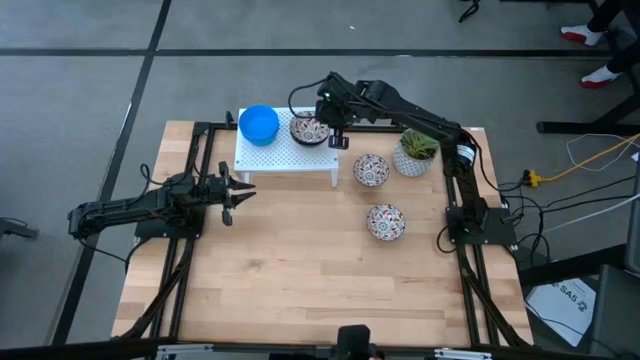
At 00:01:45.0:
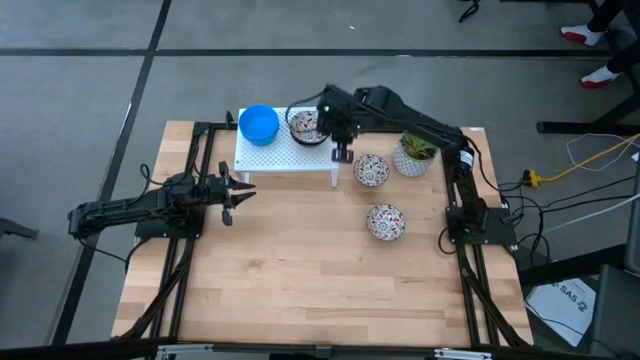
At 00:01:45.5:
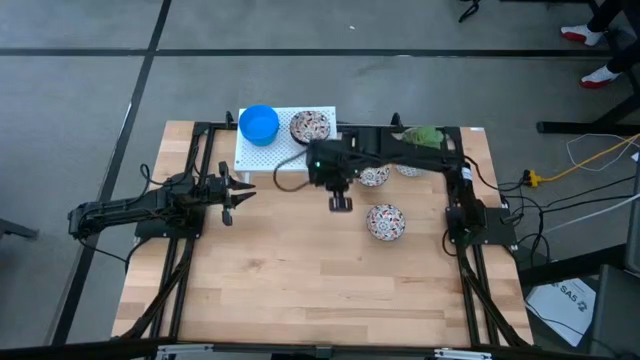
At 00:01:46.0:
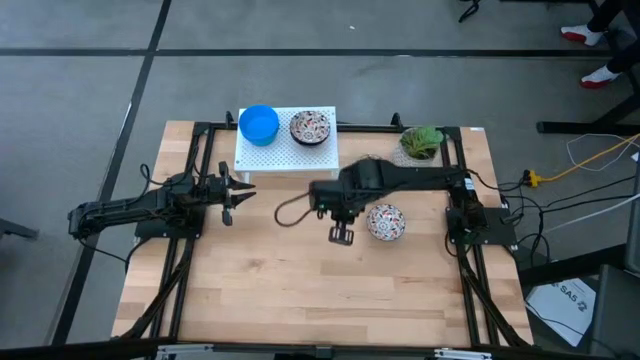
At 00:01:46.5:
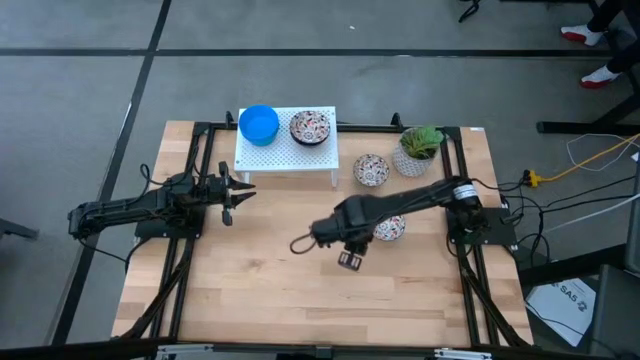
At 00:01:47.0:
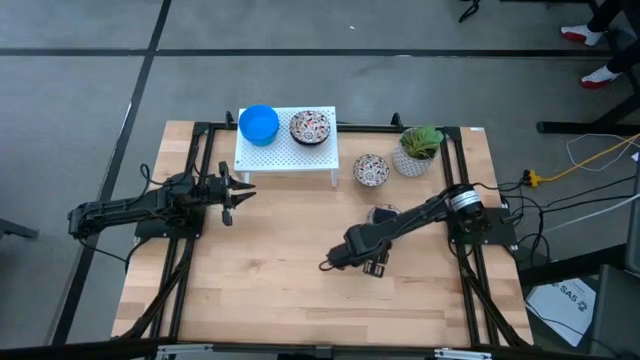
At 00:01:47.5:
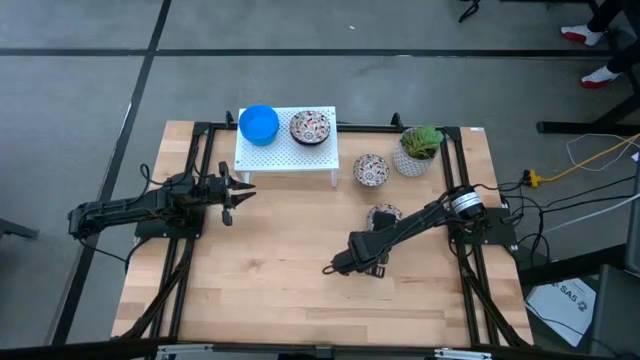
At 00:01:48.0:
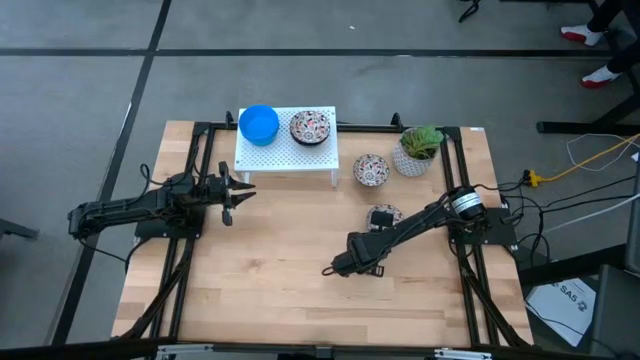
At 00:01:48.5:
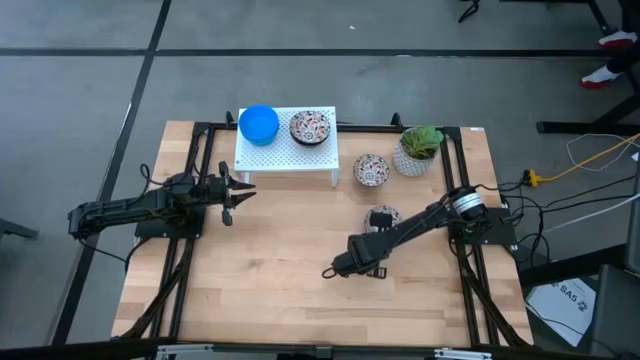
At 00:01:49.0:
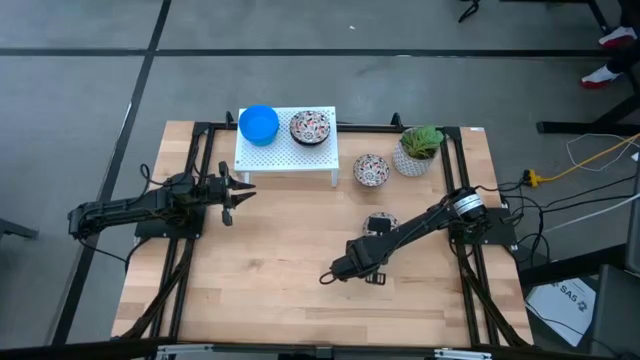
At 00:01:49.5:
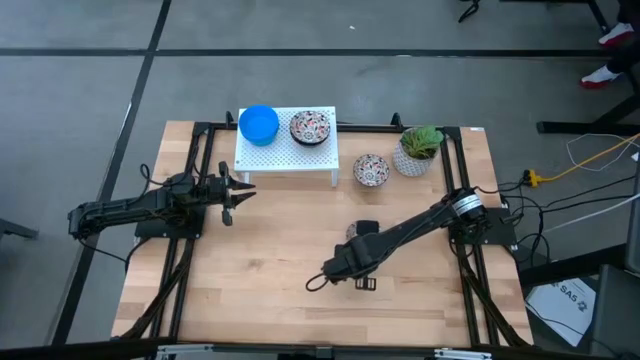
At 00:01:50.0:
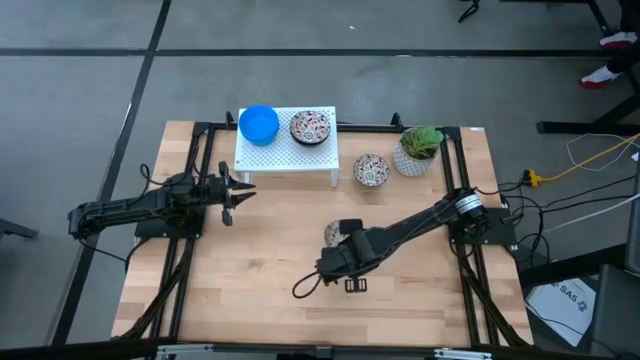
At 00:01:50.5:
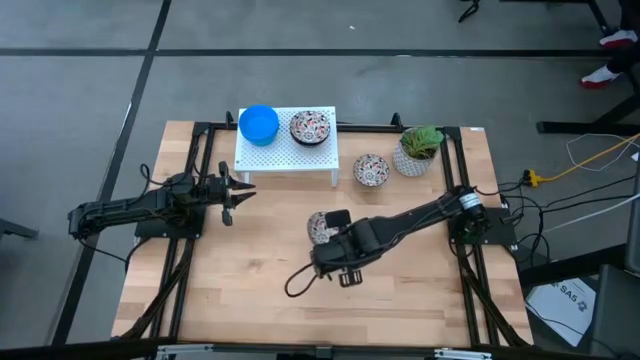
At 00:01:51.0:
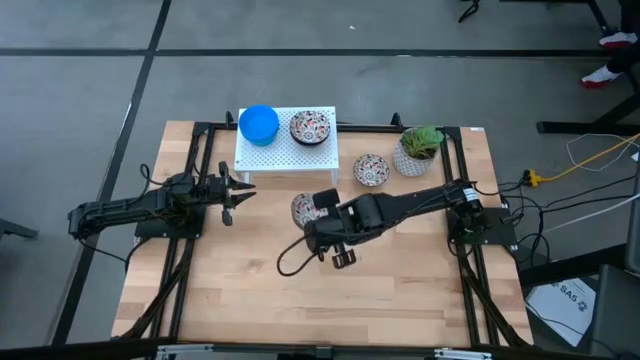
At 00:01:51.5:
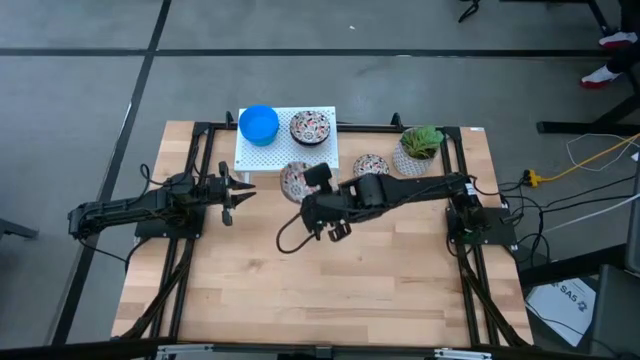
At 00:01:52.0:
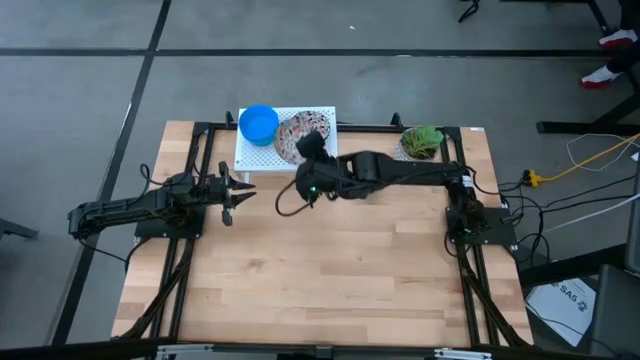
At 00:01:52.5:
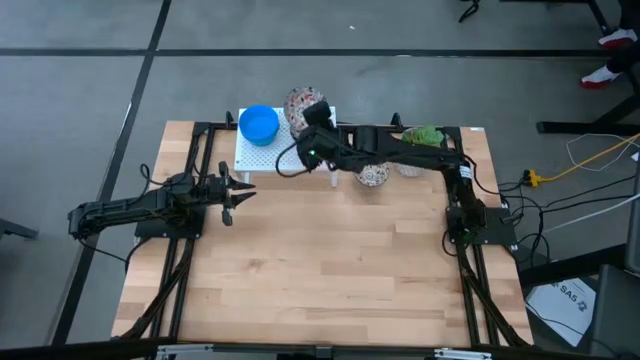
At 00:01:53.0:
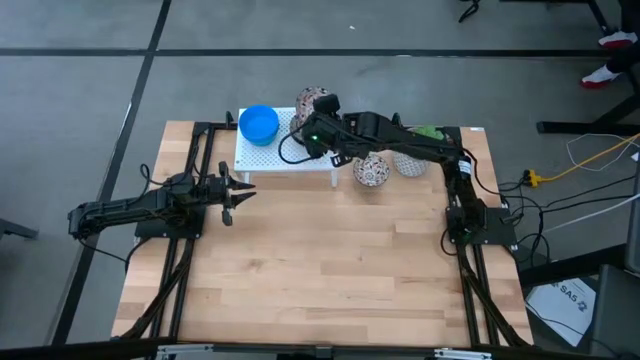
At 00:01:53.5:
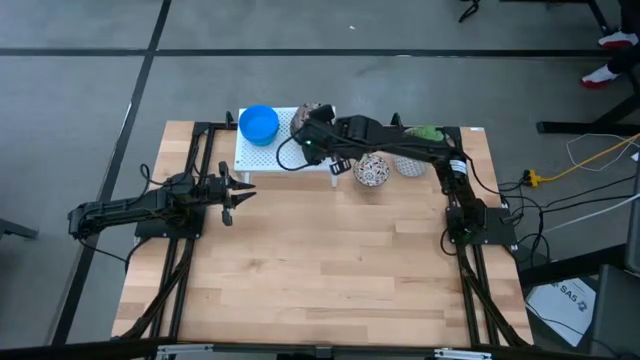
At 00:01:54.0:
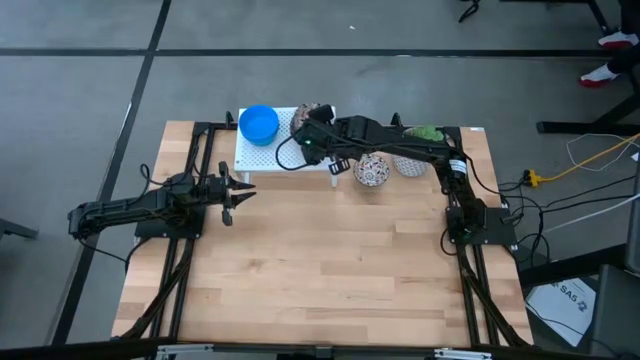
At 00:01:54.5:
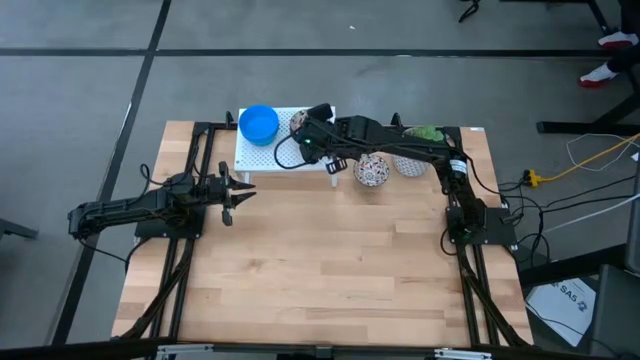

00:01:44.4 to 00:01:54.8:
Task: Pick & Place Mini bowls
Stack the patterned black bowl on the patterned black bowls on the shelf

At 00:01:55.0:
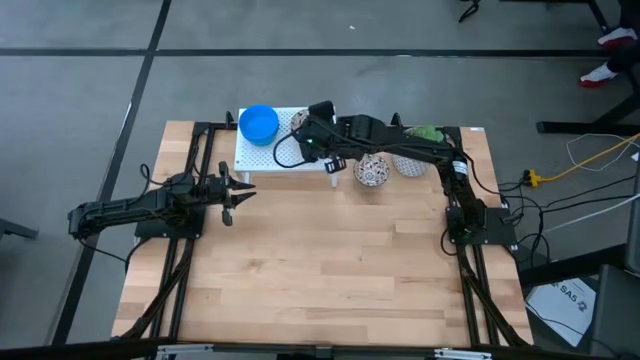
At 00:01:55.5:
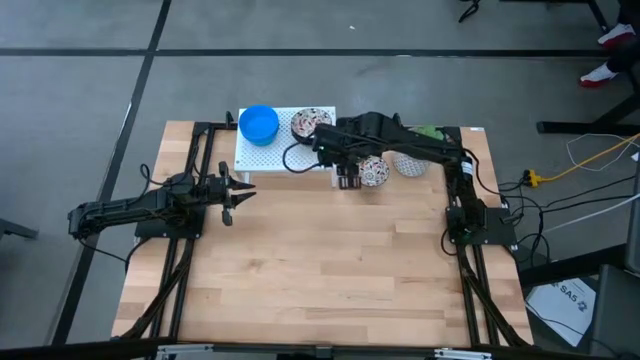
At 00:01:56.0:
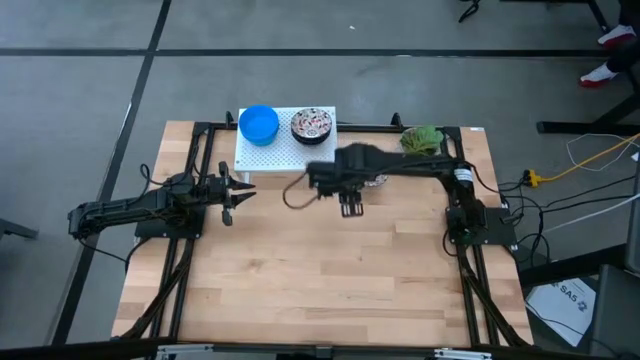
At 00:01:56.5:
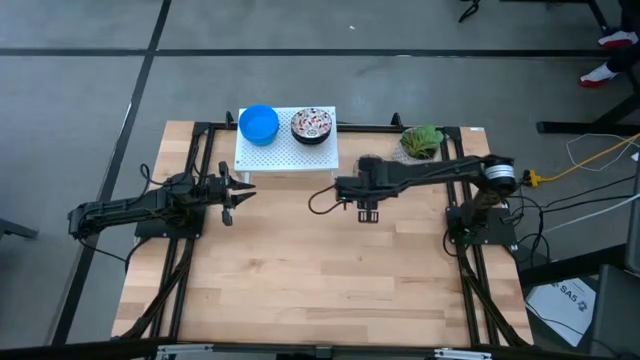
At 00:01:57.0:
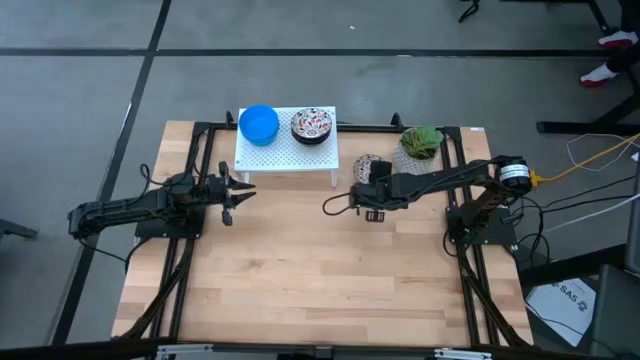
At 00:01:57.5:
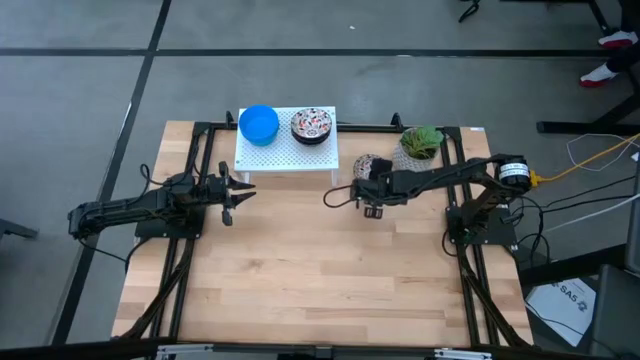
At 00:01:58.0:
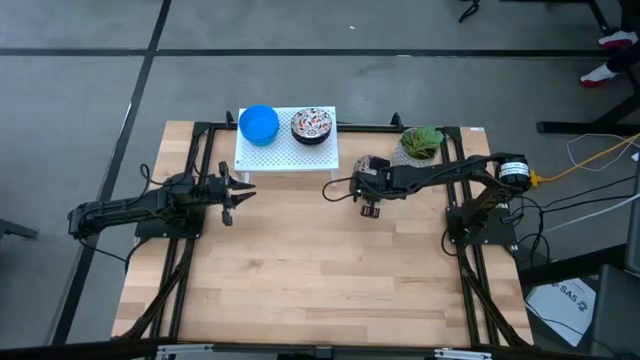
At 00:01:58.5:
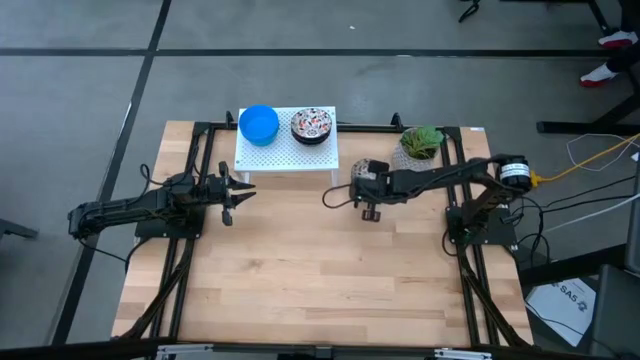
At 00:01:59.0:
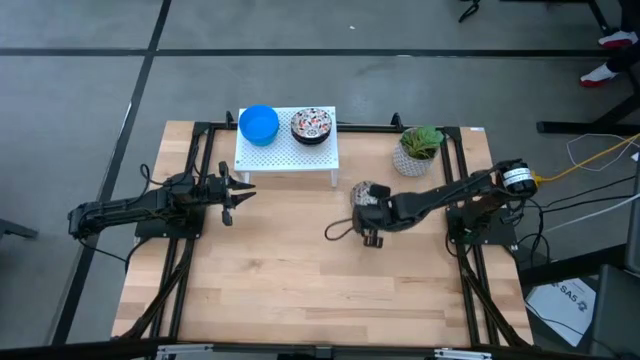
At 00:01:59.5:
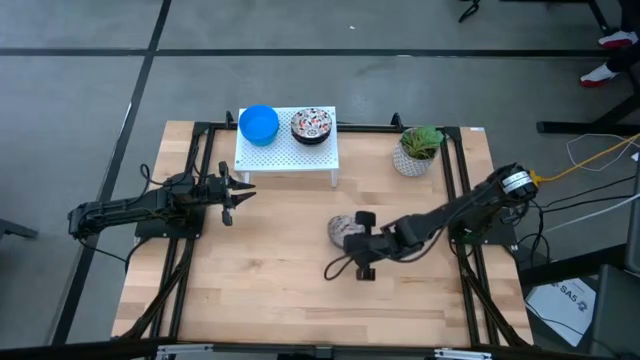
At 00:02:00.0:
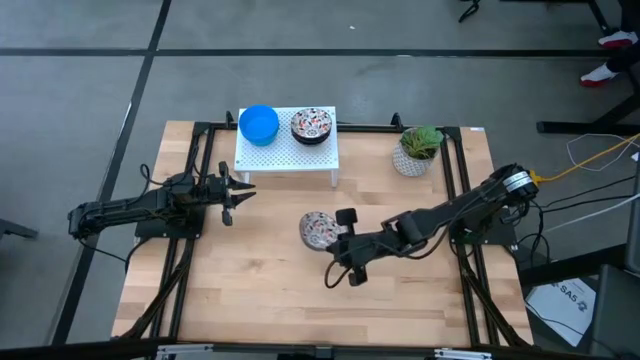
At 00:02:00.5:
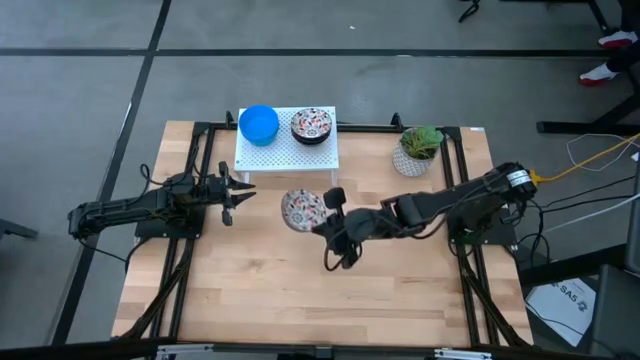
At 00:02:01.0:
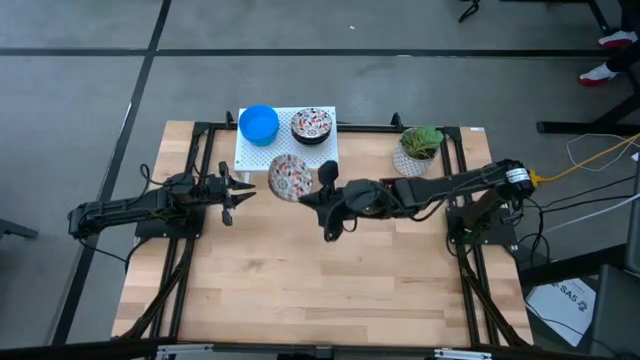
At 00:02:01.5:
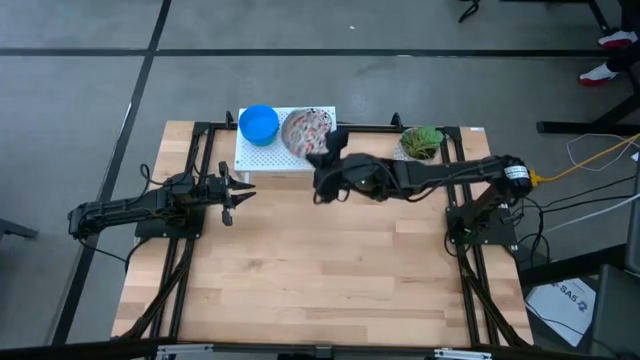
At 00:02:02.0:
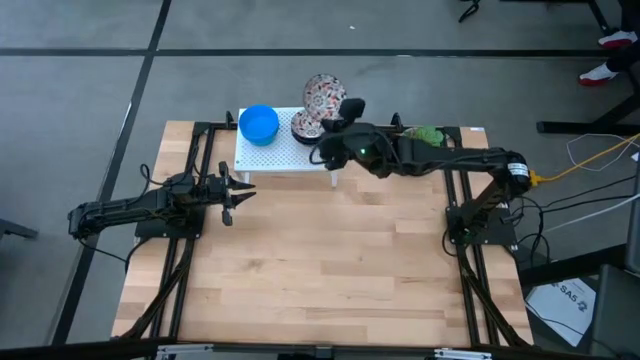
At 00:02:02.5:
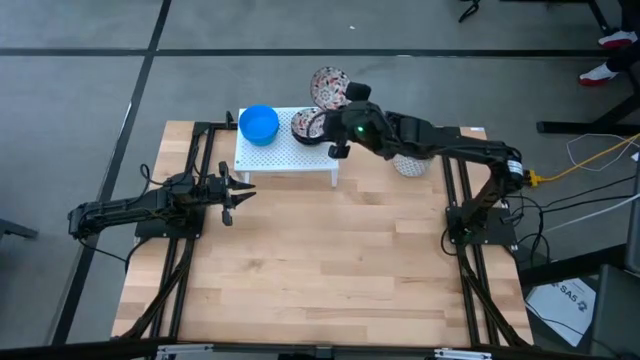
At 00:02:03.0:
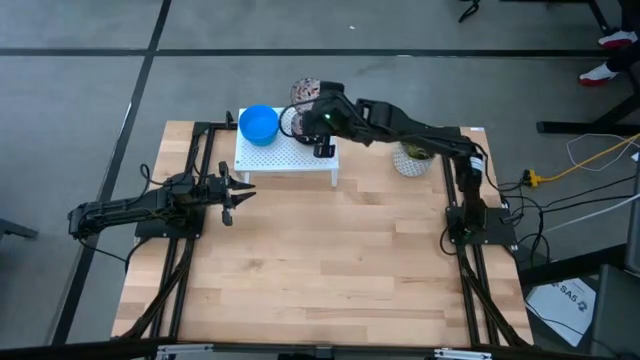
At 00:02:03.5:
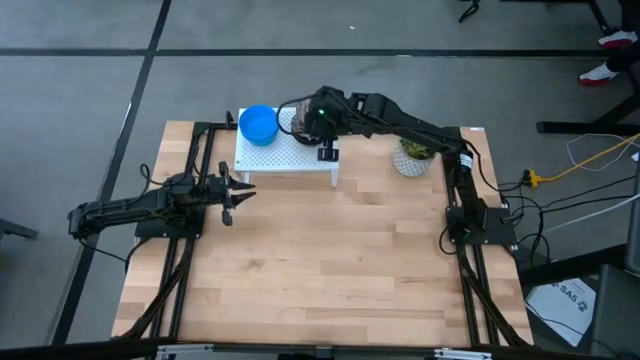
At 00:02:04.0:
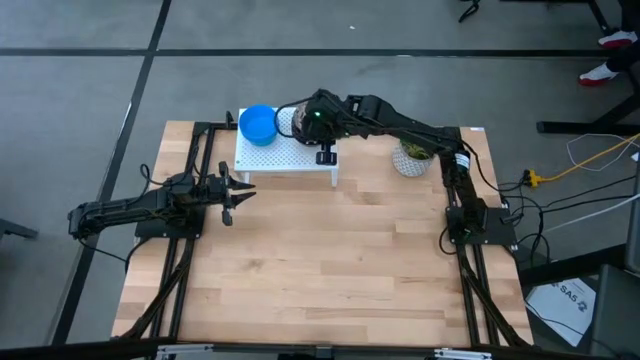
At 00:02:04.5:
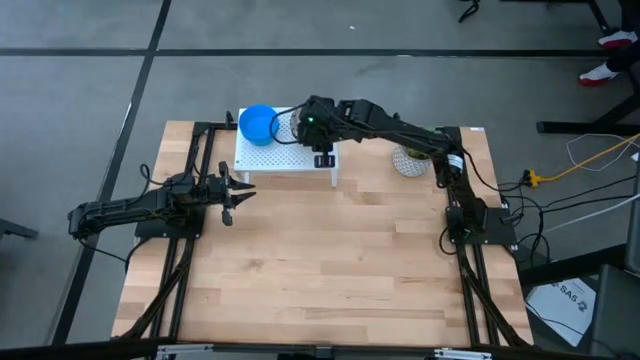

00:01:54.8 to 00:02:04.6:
Stack the patterned black bowl on the patterned black bowls on the shelf
